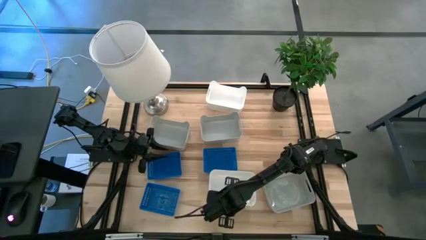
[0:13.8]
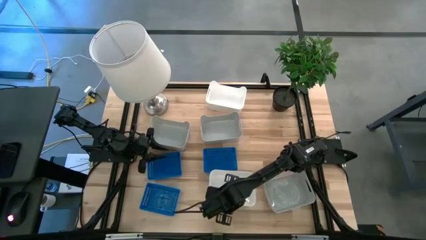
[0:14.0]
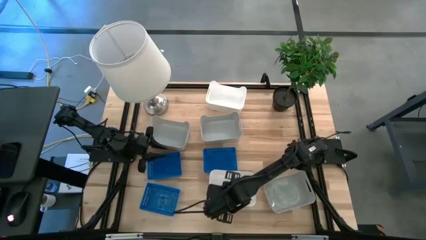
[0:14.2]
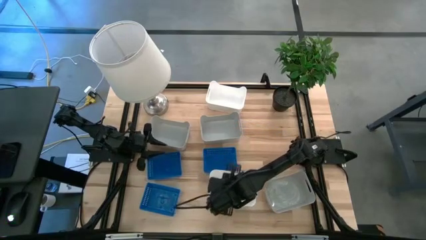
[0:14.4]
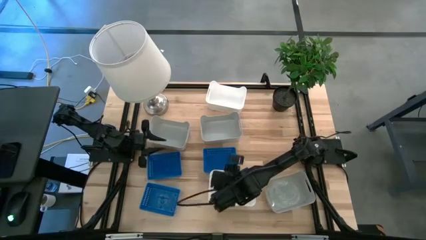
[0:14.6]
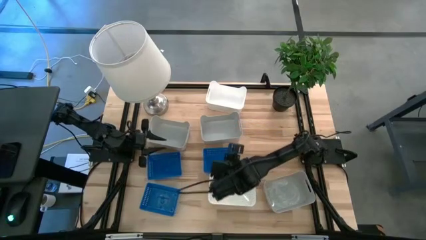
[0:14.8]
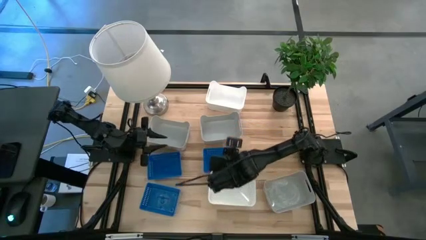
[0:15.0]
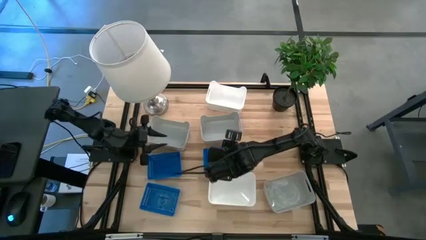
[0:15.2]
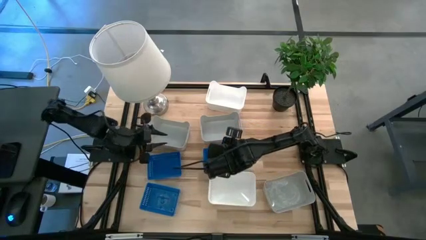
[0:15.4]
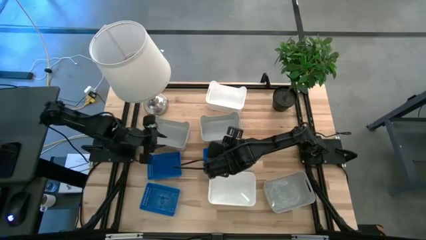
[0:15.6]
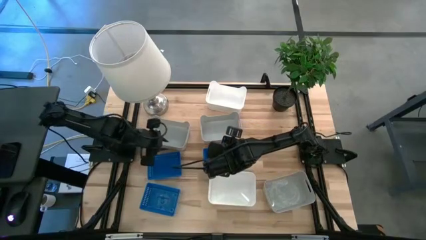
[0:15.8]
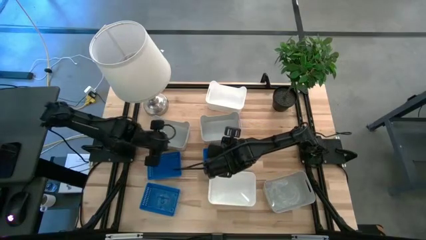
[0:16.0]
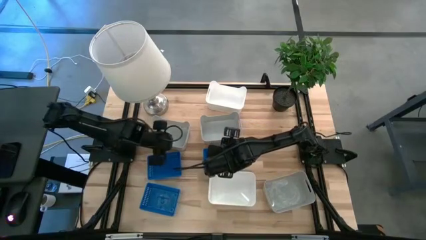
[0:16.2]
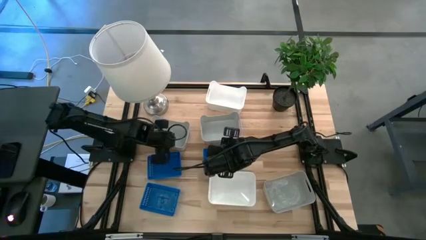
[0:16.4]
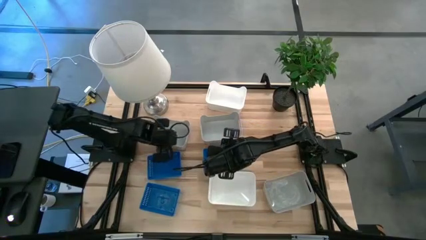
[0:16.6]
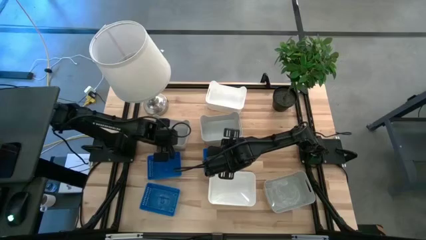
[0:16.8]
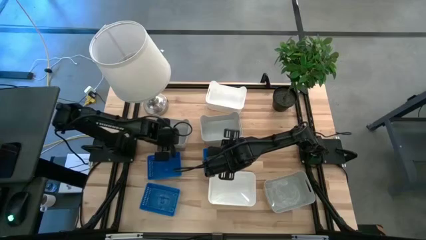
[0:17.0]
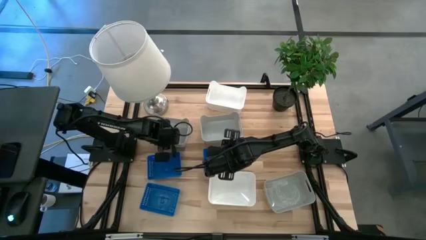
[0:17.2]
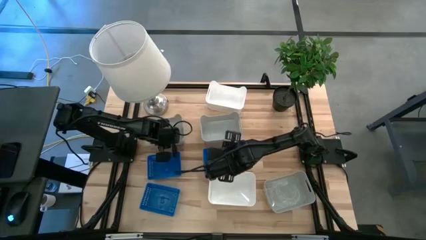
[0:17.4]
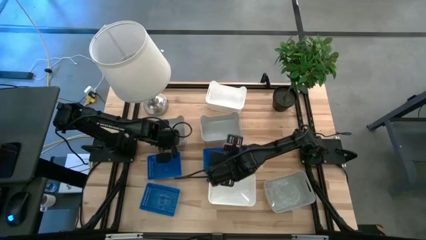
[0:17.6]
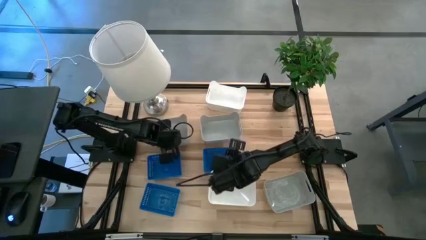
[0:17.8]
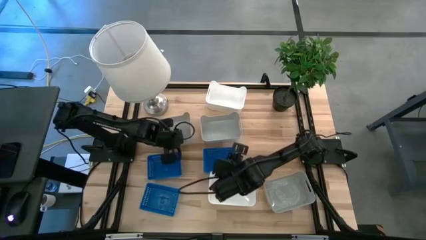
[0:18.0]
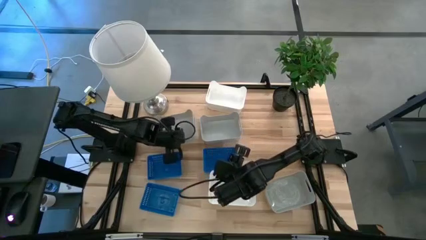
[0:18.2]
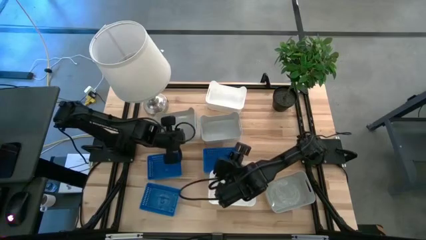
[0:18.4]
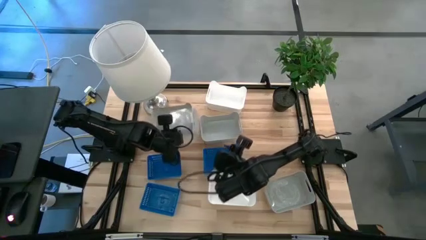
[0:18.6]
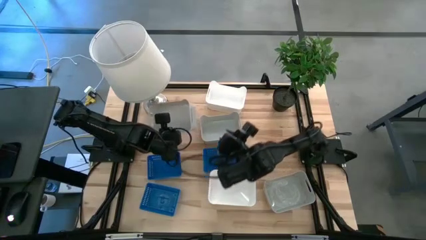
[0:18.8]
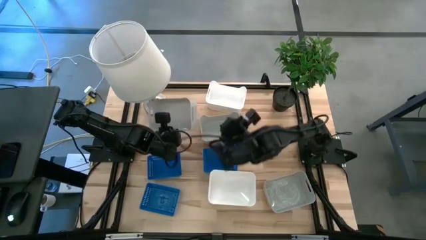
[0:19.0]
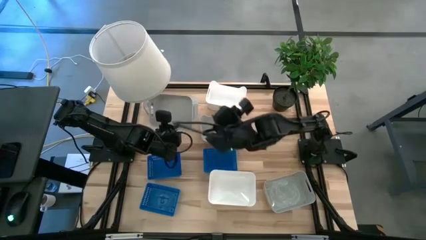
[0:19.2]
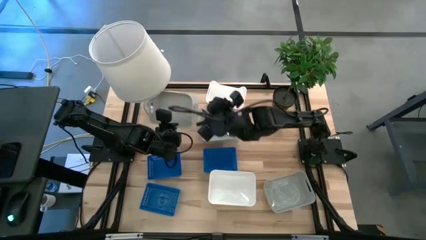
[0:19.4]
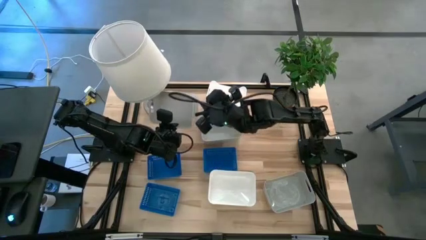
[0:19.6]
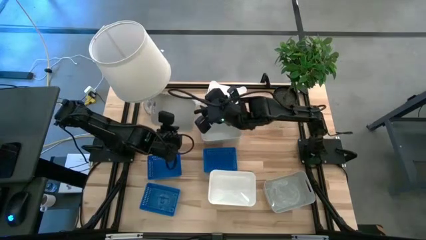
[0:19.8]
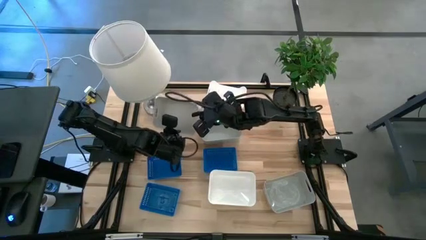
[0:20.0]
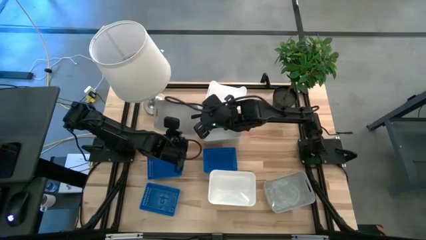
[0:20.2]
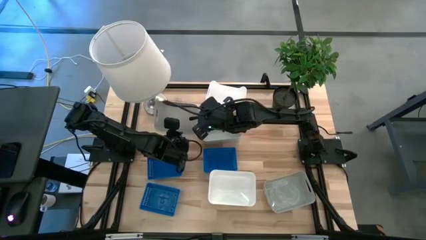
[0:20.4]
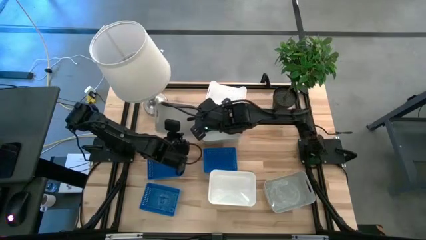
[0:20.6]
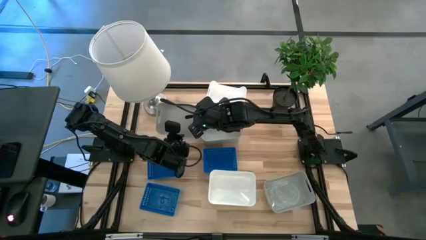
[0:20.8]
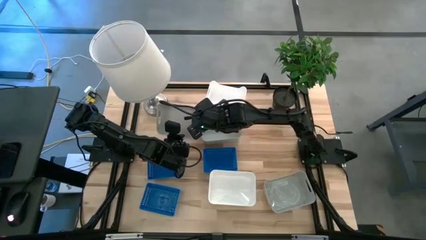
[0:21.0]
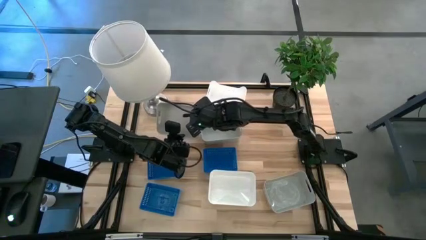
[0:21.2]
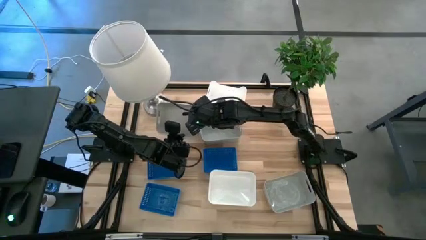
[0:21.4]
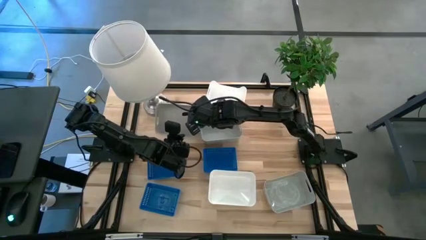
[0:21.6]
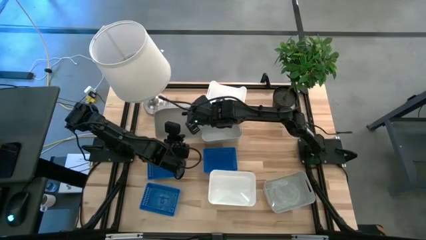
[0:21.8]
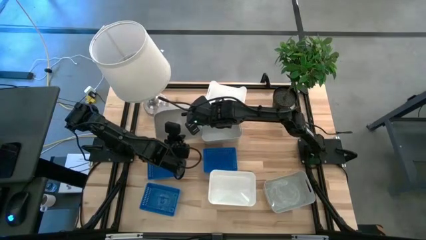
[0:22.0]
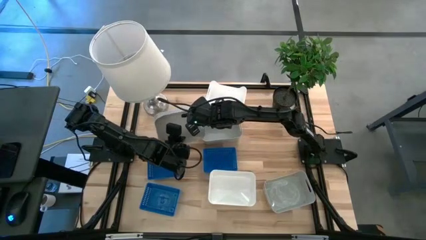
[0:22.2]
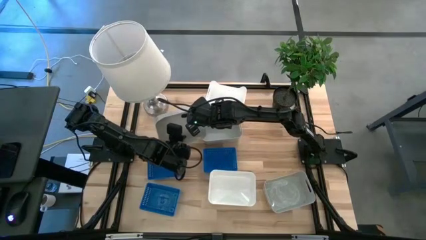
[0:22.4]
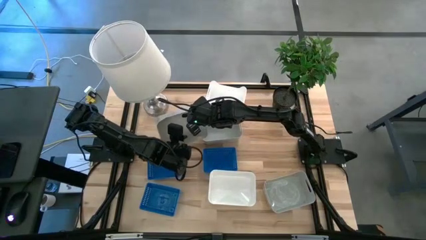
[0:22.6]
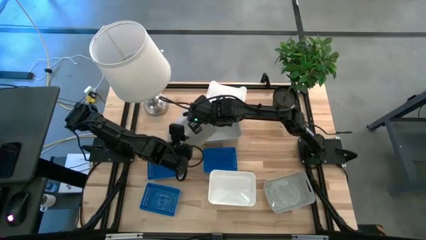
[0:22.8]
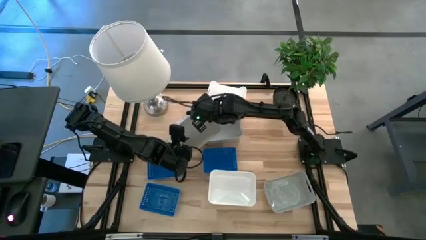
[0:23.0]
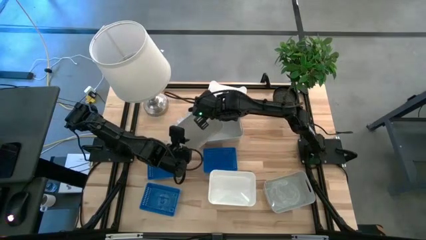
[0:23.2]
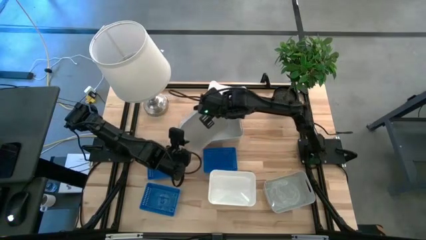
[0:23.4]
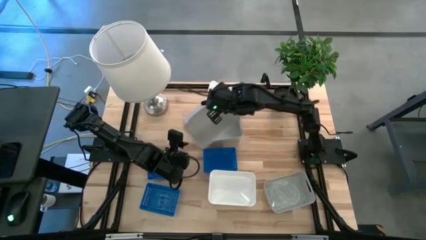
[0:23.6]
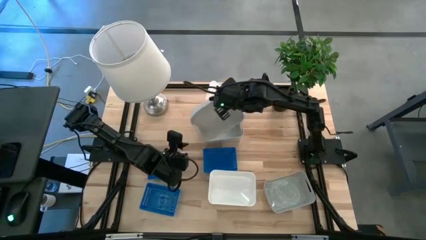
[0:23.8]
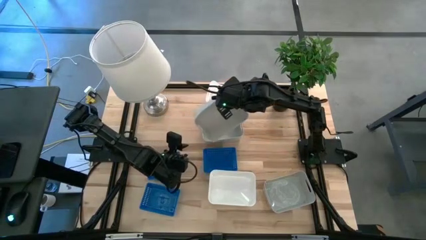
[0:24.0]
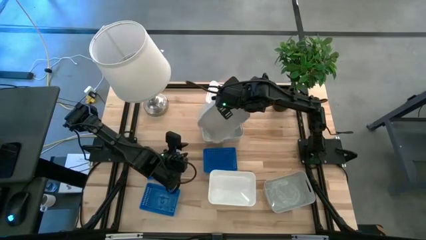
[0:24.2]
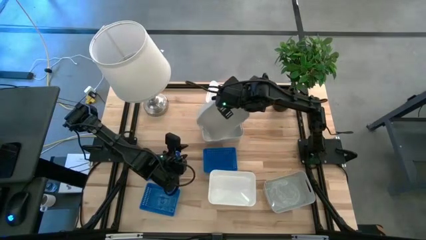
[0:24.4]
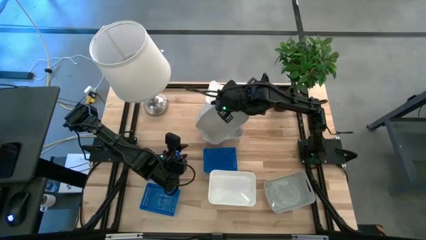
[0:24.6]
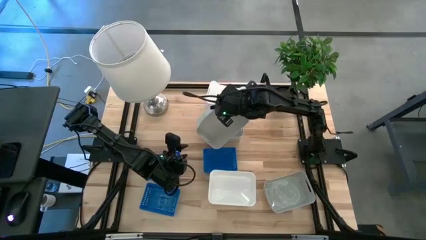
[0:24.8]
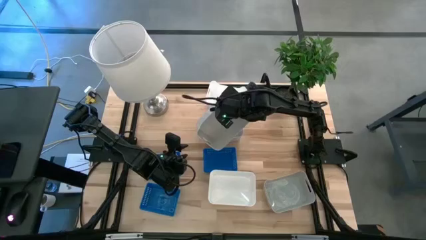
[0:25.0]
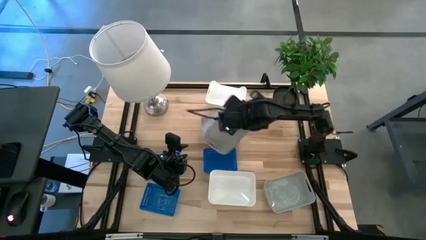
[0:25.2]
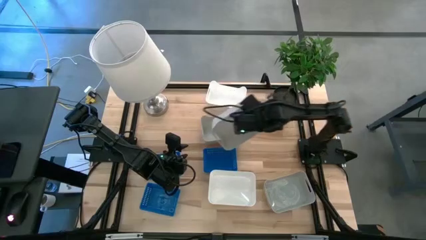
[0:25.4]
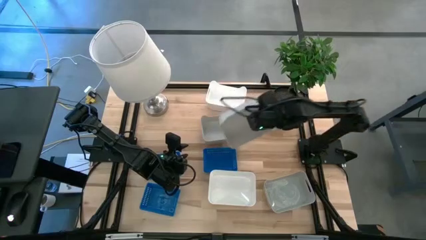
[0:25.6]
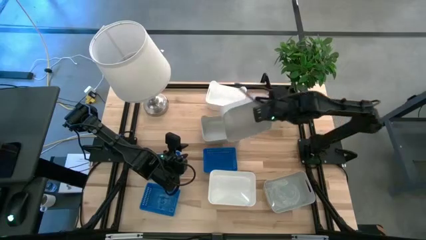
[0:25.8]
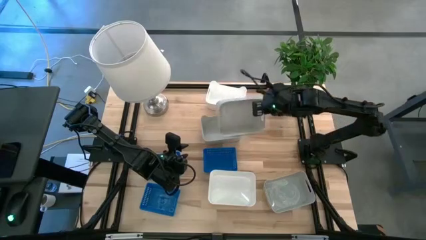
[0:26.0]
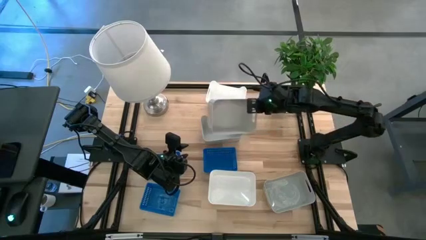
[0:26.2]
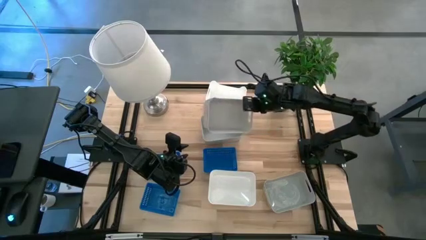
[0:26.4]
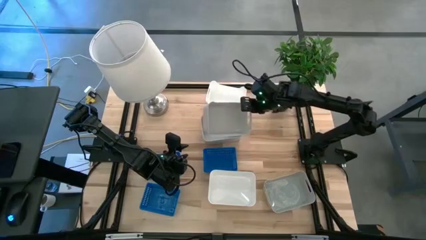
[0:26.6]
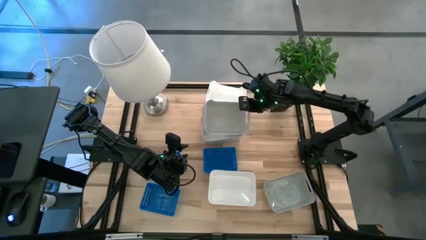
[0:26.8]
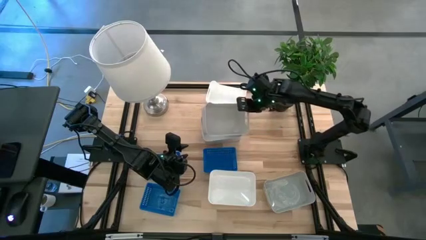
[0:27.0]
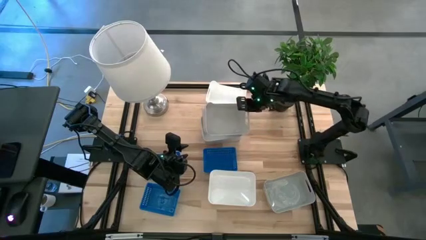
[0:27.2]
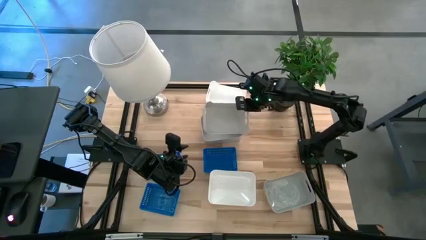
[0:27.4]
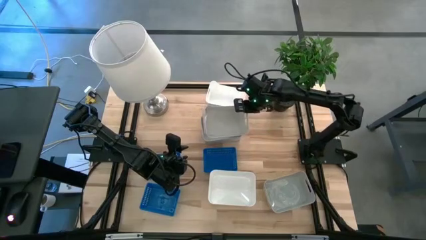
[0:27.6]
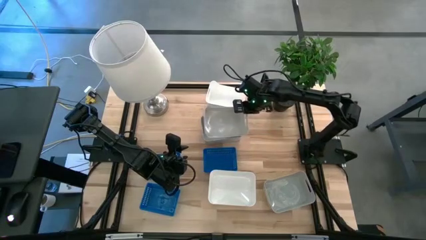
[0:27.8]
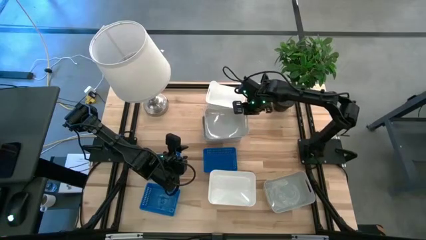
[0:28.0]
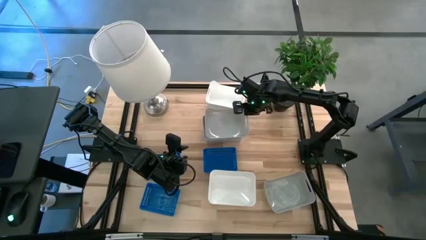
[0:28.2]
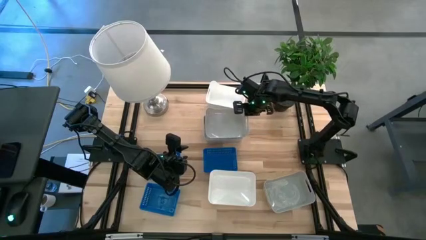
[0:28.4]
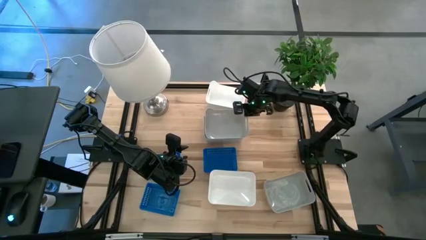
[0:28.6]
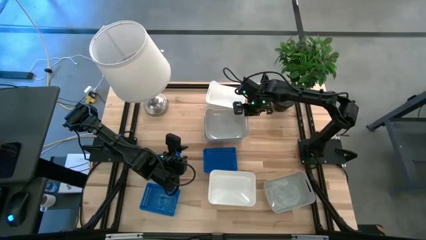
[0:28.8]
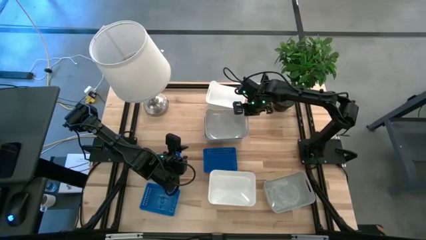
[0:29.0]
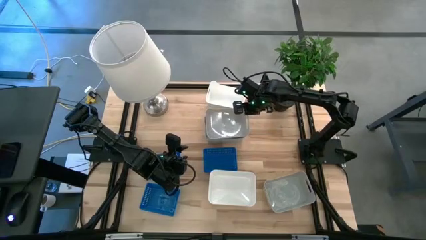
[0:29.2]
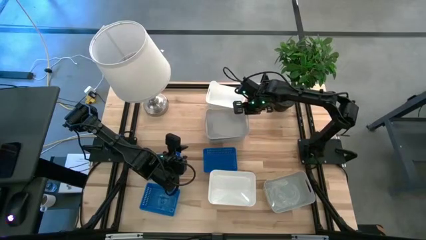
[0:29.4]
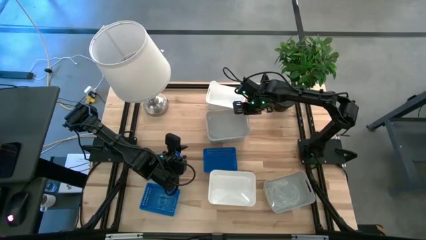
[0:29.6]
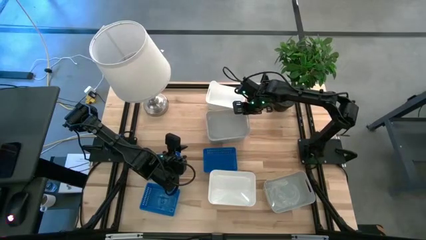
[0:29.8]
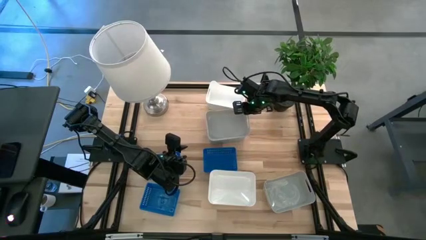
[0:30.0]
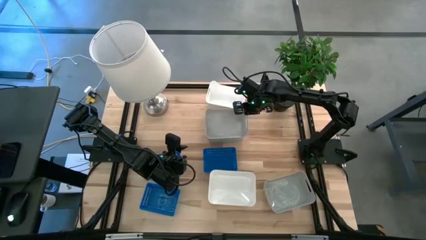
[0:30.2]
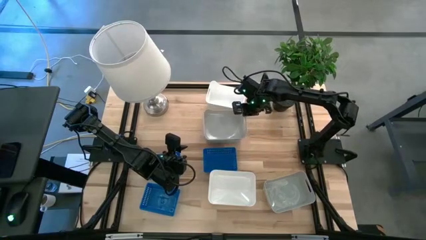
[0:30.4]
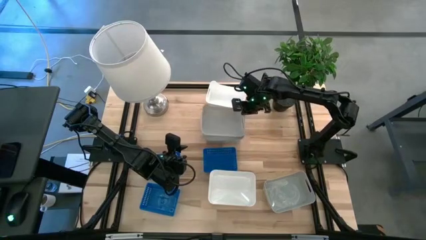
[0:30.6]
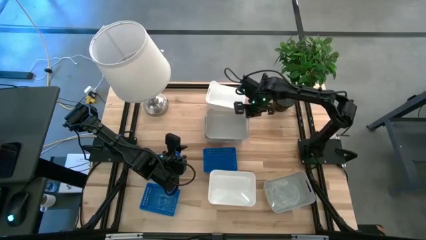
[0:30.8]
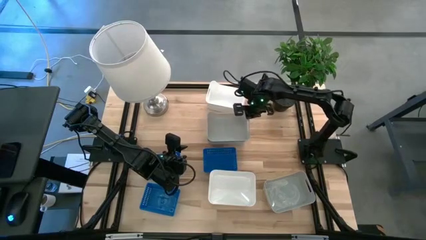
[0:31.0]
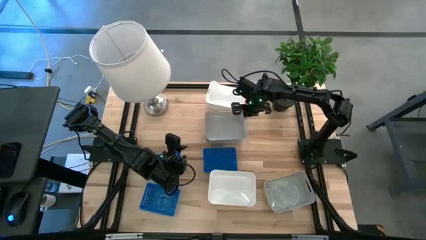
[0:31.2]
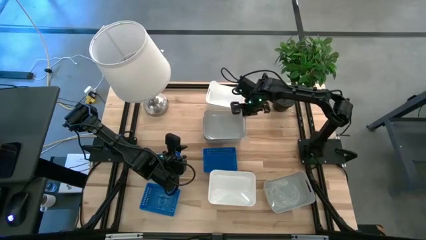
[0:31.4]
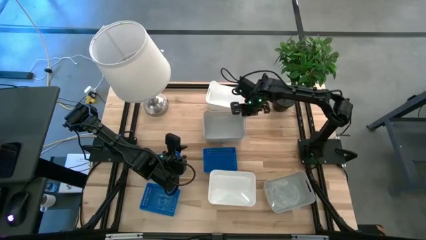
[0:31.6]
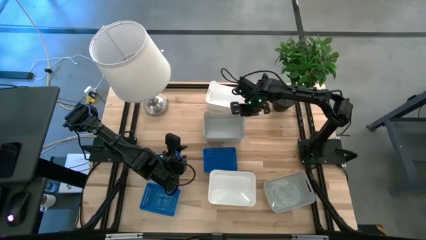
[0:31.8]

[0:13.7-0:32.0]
Stack the top left gray bin on the top left gray bin
